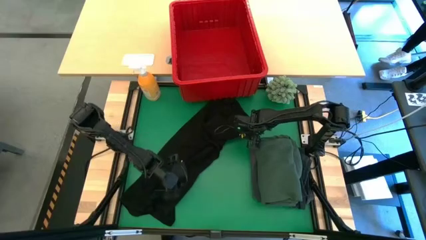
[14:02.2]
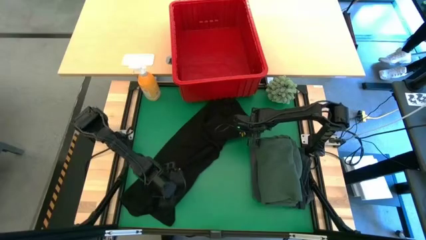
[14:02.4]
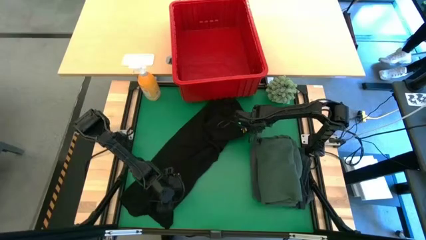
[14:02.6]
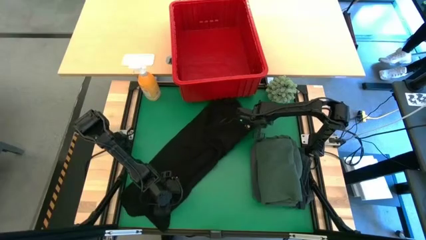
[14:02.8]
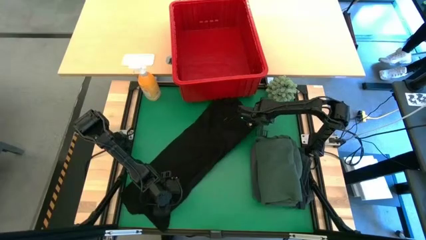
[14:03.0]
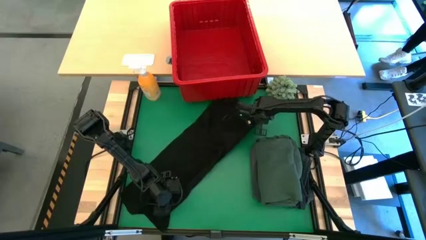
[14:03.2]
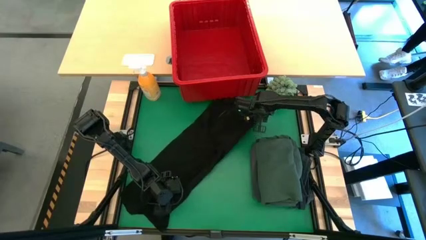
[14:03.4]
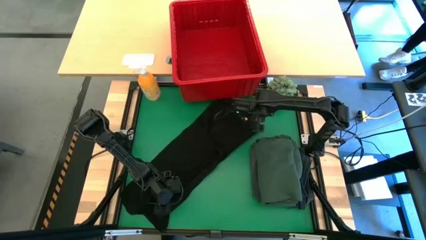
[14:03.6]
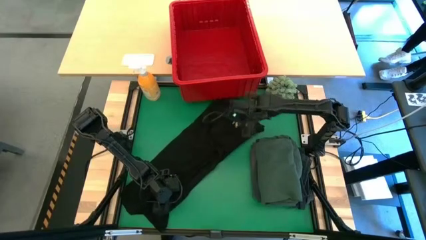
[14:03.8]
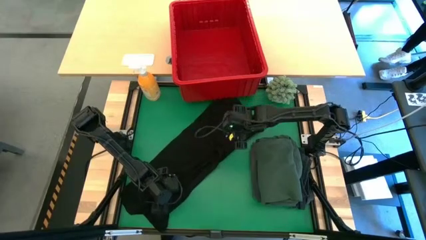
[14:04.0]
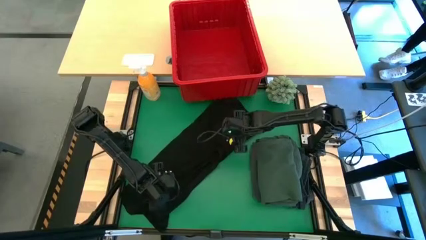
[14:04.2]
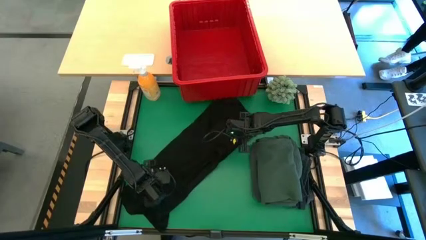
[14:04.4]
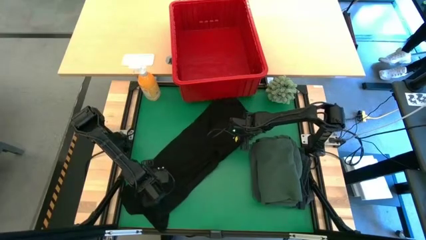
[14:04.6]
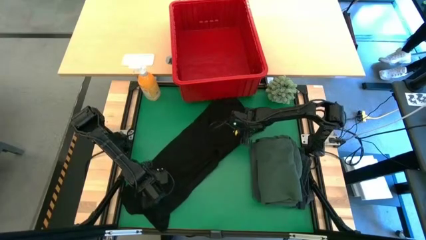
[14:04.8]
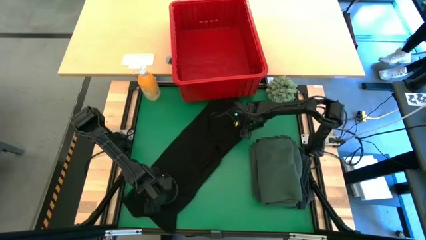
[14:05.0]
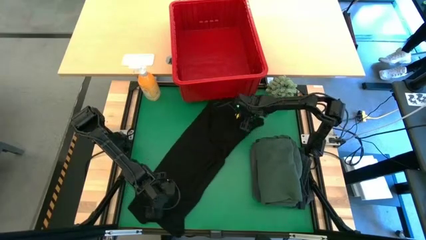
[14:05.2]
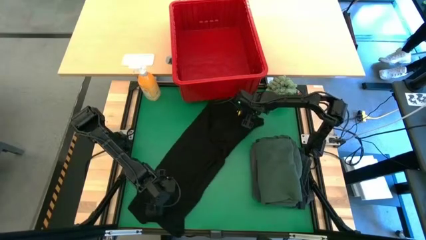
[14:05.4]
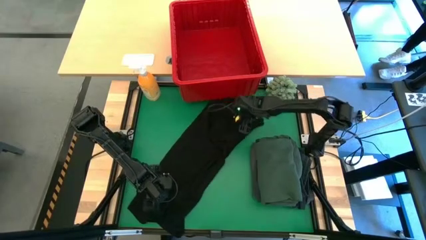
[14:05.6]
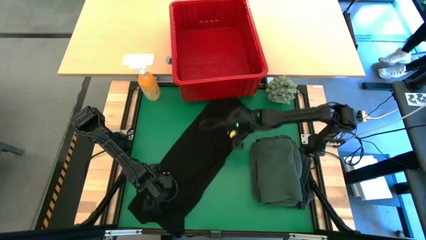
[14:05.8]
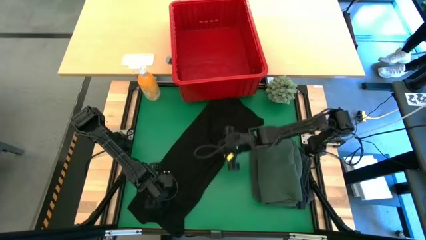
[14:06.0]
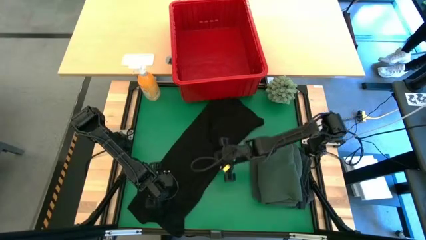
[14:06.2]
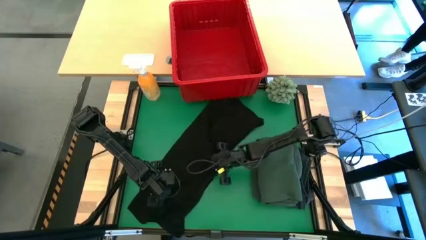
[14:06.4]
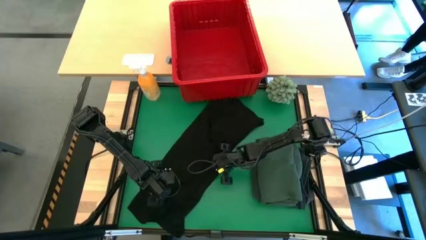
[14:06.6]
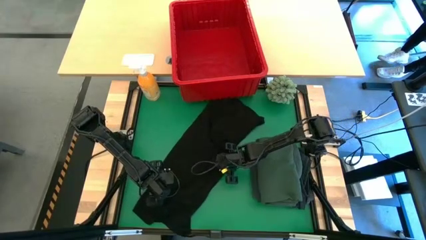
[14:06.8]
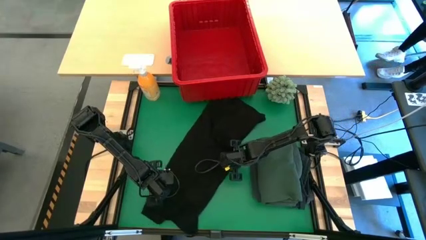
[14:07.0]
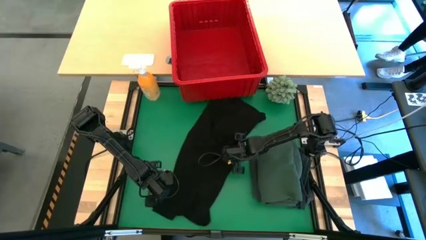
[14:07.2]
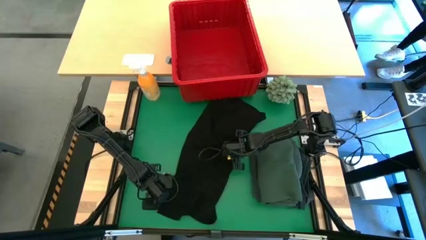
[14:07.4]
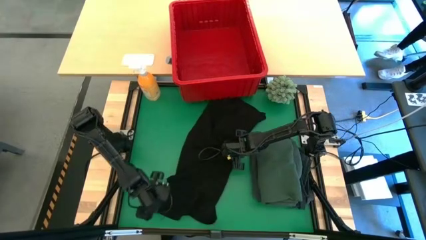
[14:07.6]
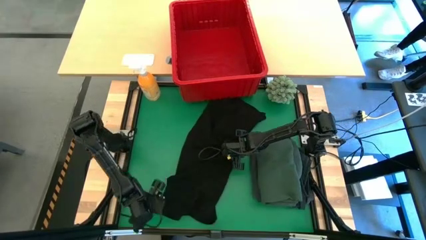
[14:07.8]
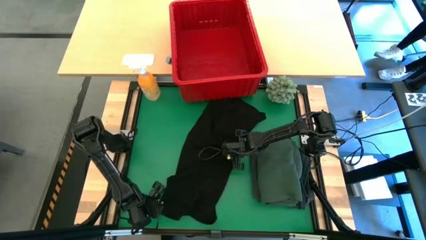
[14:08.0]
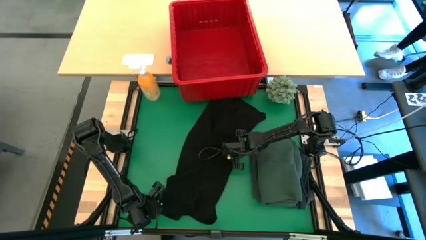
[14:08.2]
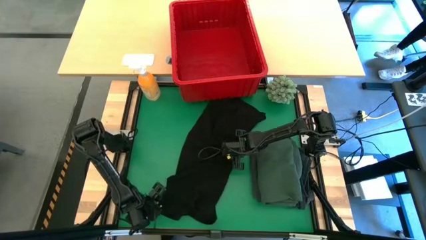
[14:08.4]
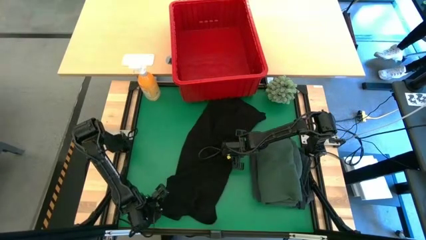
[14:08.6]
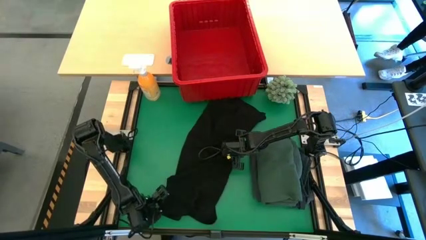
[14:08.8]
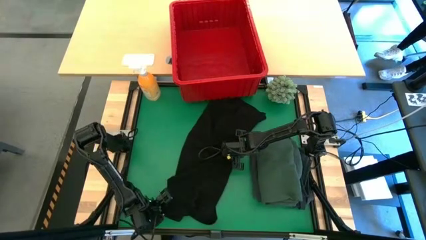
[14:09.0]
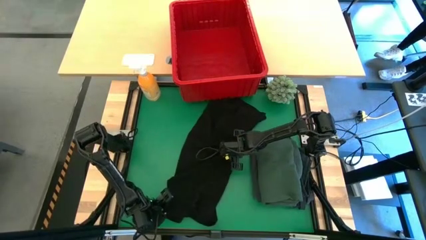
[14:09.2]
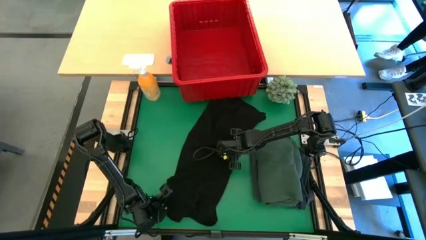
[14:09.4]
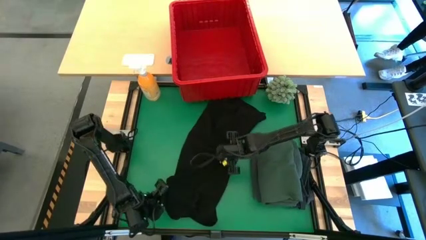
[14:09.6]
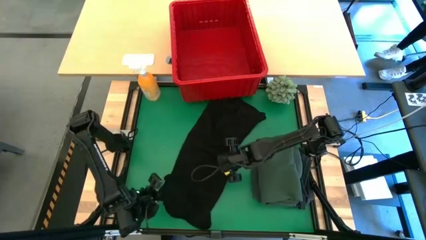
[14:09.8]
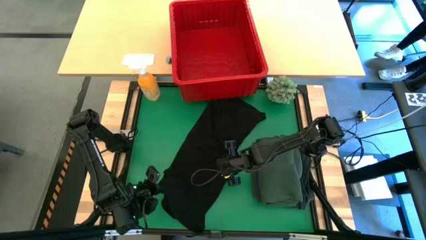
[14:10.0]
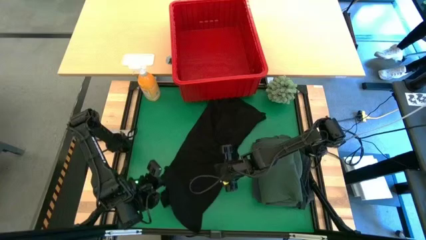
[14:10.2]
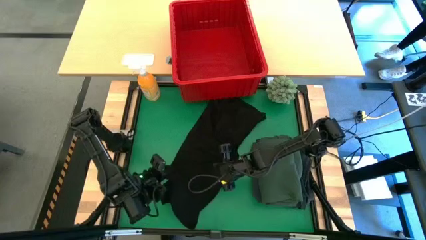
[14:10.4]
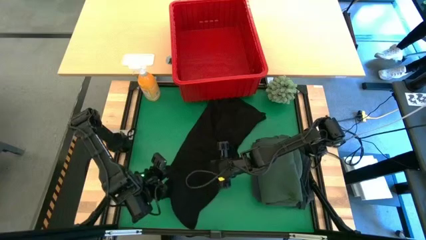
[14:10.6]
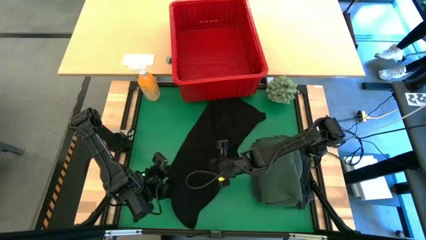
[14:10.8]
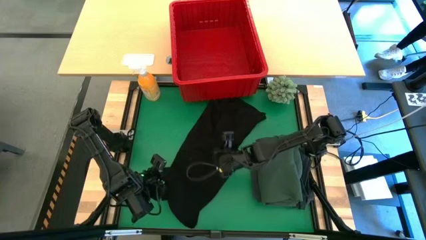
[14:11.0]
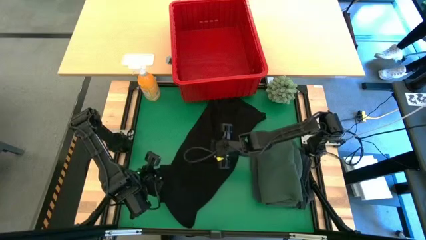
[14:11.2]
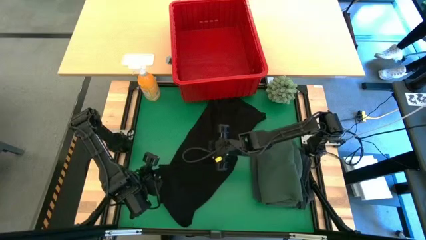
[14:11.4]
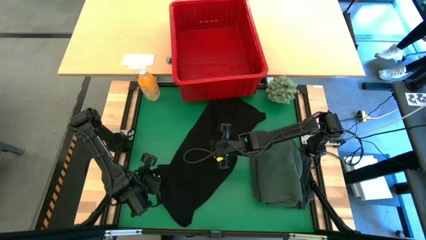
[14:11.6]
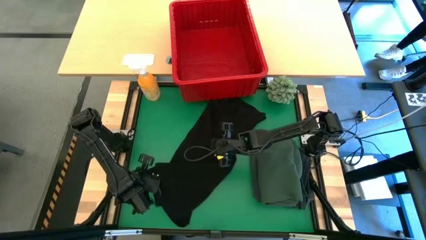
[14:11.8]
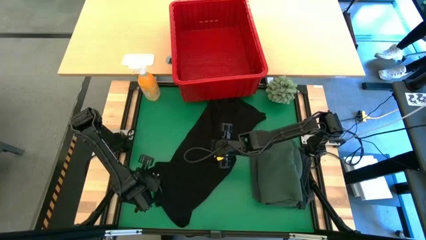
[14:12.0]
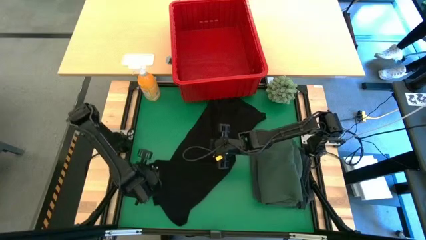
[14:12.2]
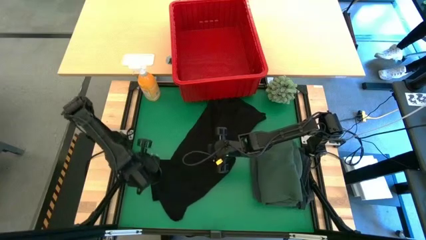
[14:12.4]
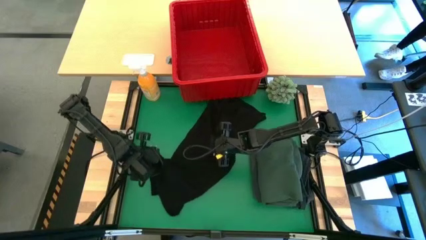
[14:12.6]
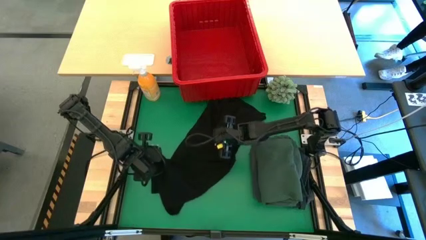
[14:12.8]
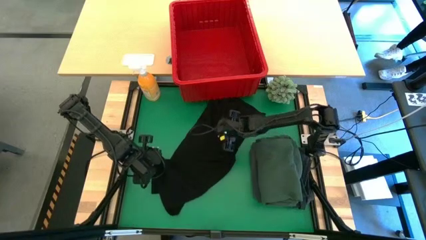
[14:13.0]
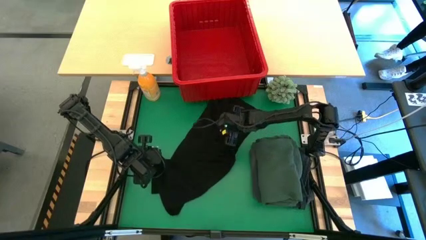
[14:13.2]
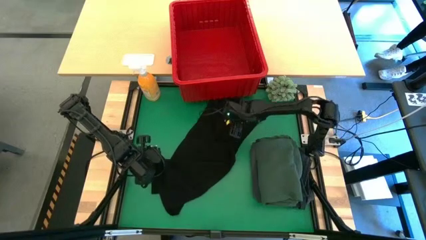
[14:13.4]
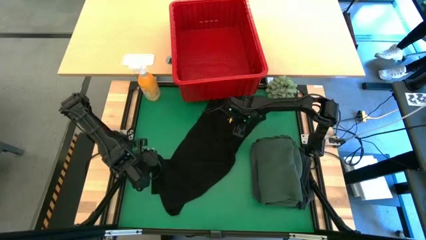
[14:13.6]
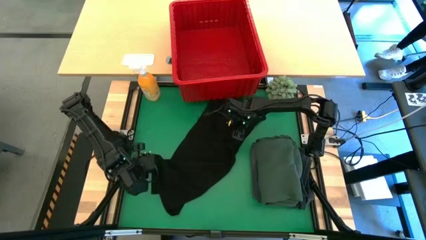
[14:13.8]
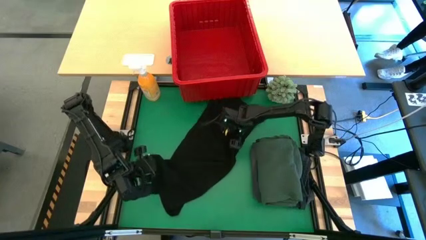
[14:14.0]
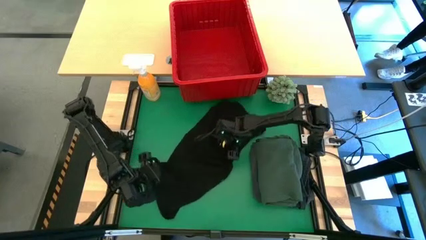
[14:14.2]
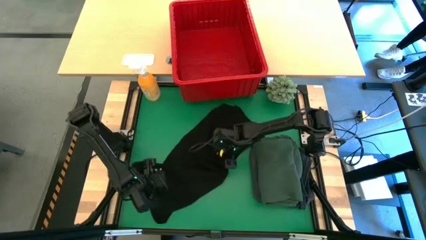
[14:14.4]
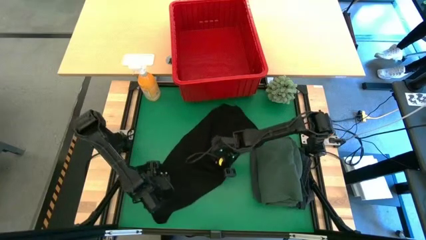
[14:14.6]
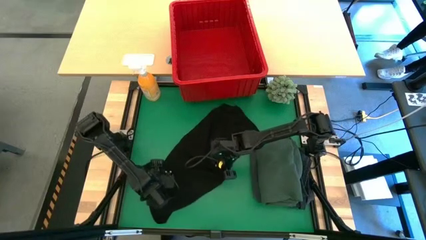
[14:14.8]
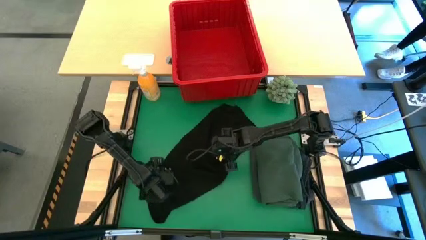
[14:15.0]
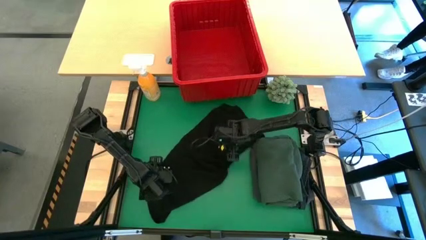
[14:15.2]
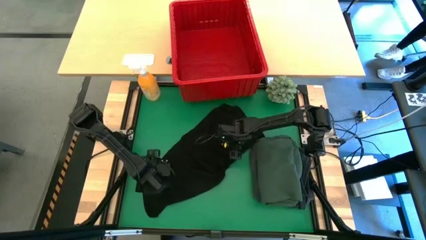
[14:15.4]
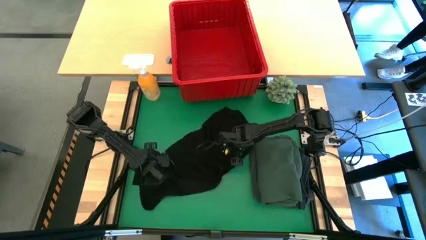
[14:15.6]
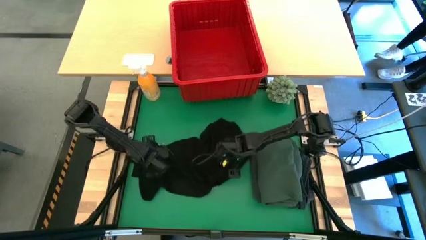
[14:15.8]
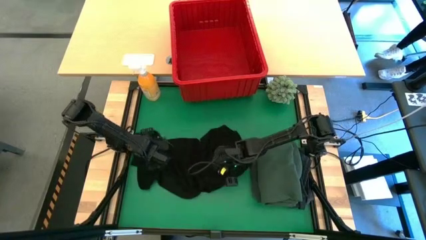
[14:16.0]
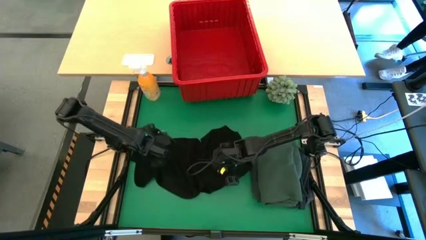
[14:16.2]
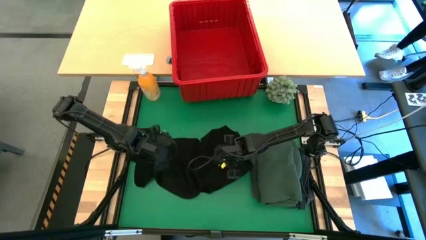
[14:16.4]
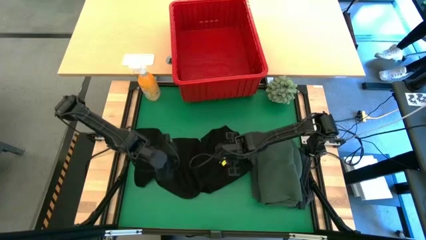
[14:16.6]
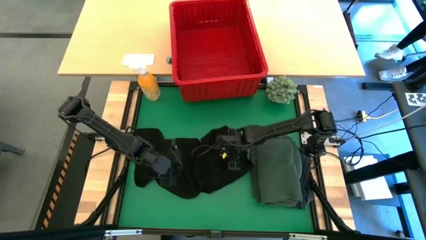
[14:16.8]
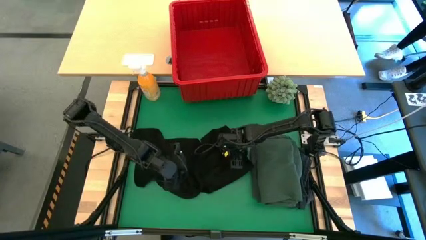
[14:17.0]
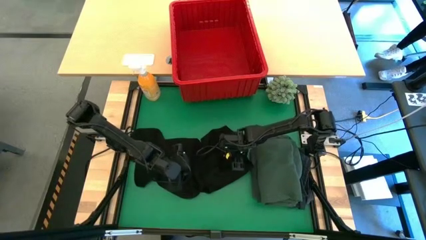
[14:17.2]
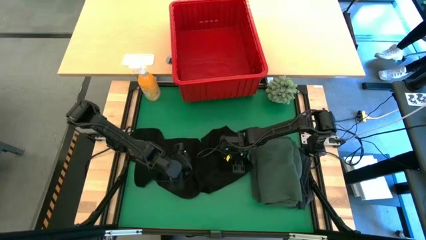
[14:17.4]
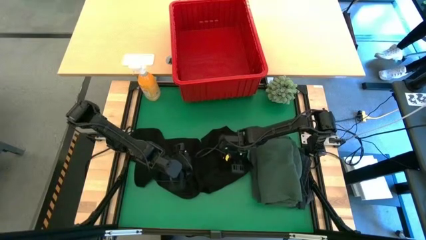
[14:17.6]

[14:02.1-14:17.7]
Task: Fold Laundry from Bin
Fold the black shirt

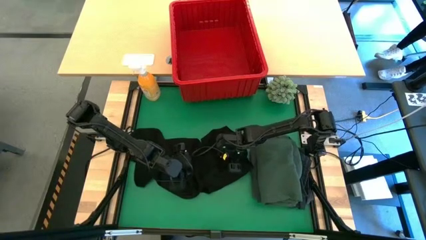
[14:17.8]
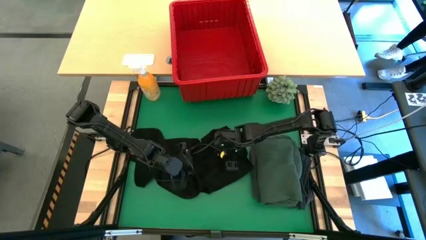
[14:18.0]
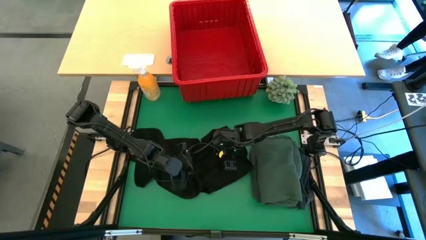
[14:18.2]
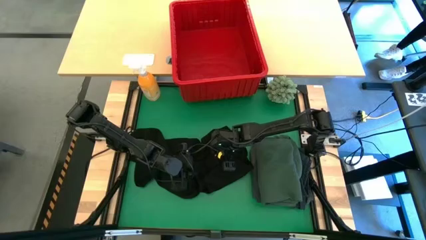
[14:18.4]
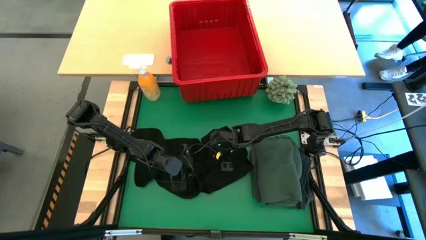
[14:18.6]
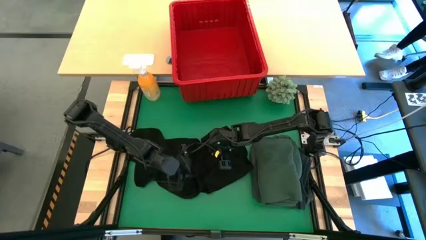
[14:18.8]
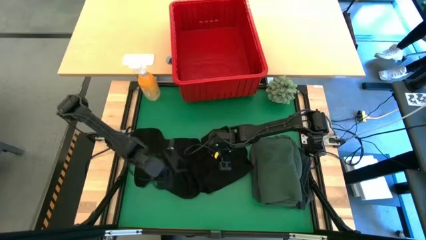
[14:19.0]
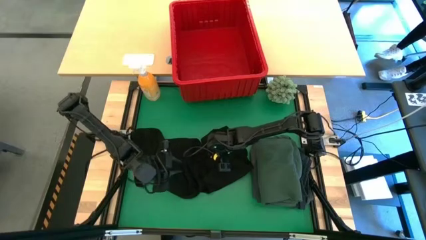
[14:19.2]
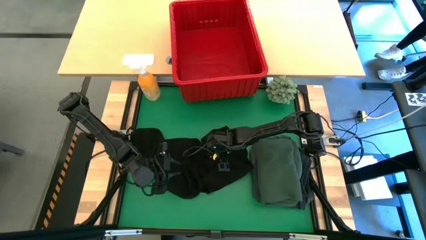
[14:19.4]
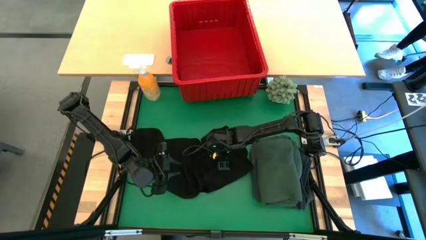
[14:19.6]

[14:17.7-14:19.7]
Fold the black shirt
